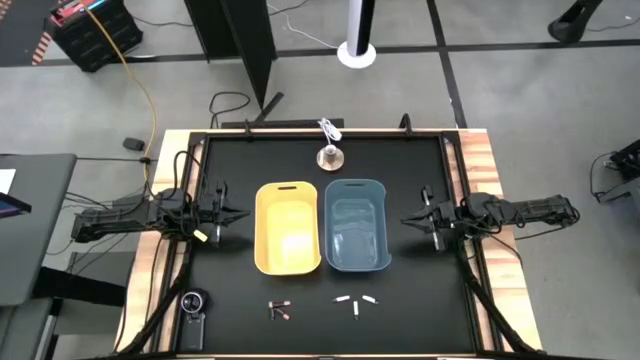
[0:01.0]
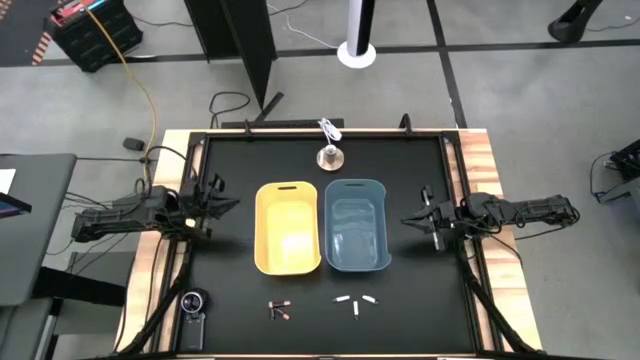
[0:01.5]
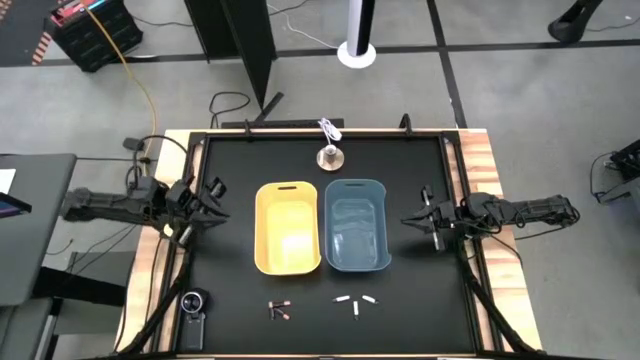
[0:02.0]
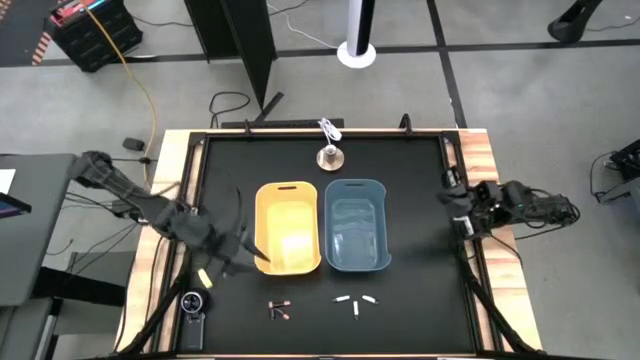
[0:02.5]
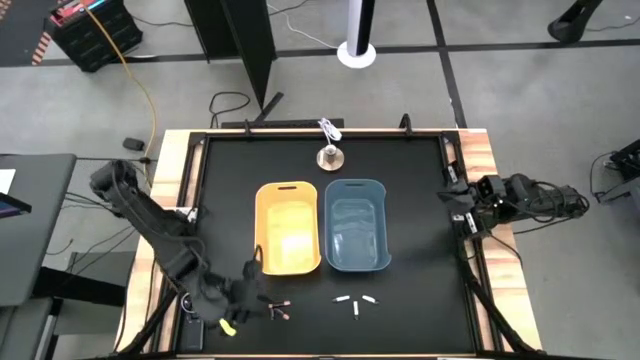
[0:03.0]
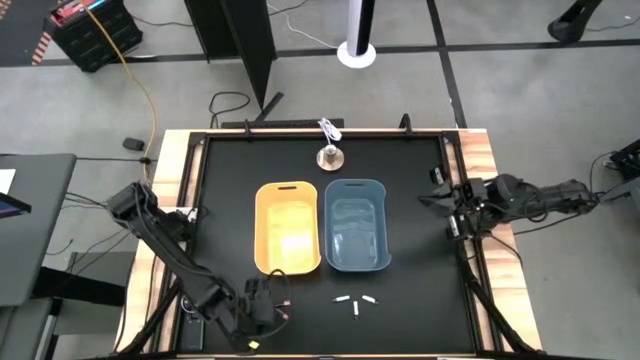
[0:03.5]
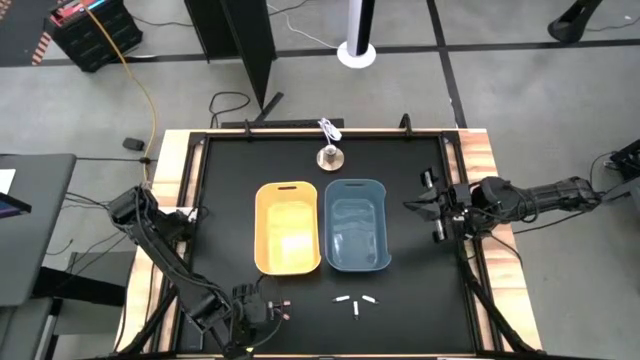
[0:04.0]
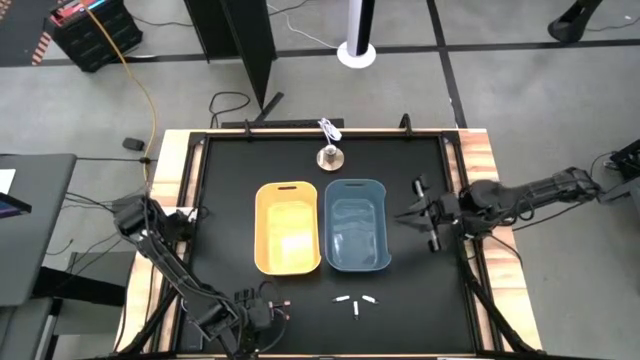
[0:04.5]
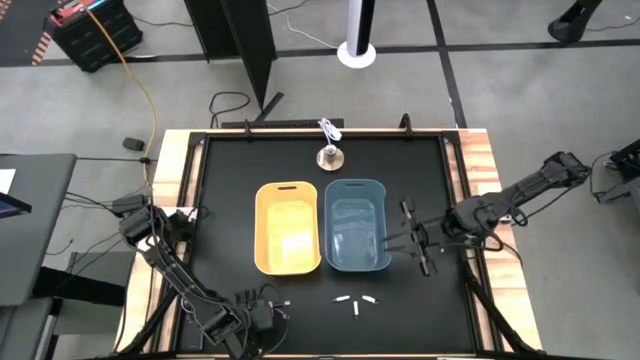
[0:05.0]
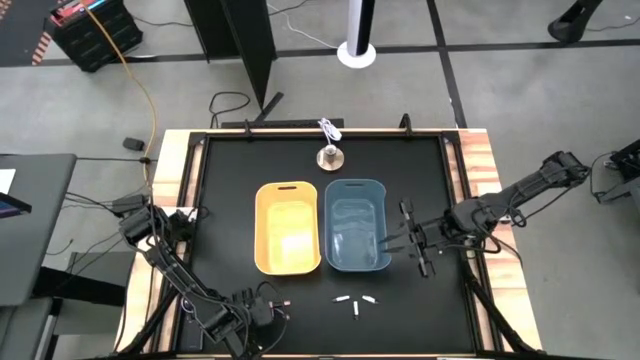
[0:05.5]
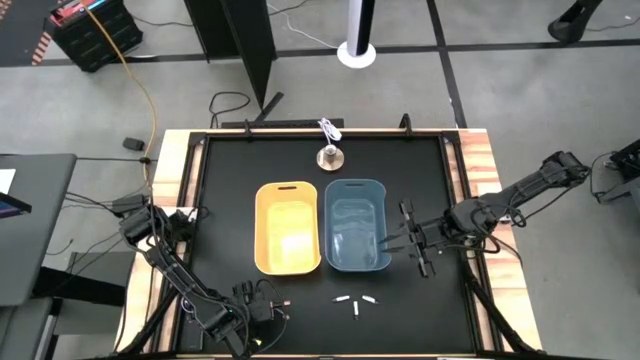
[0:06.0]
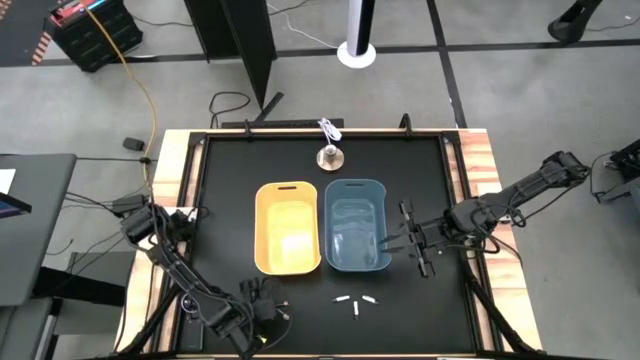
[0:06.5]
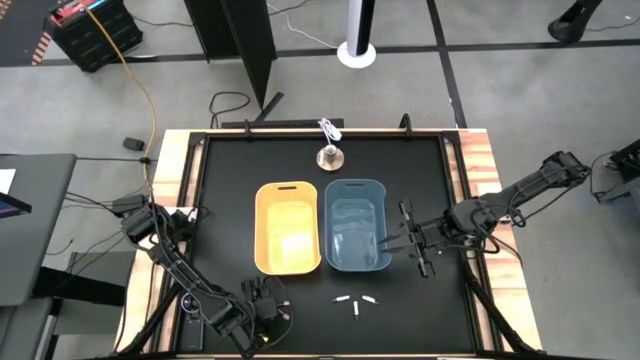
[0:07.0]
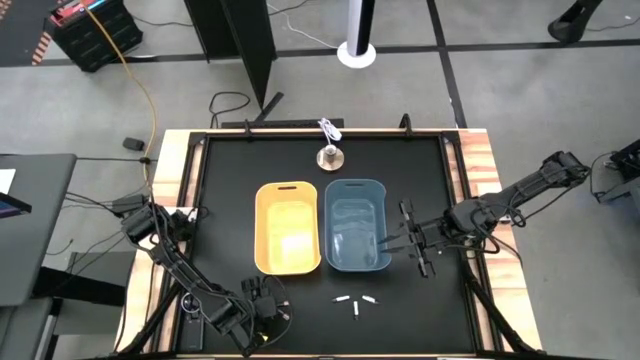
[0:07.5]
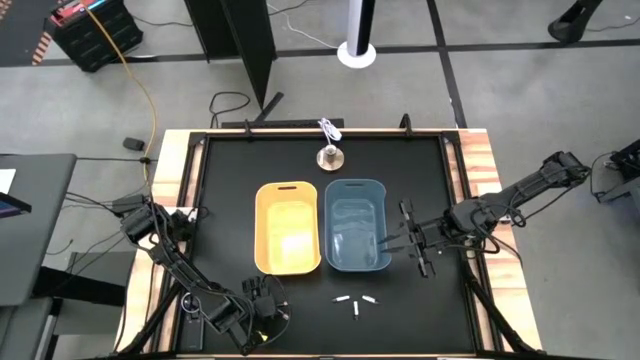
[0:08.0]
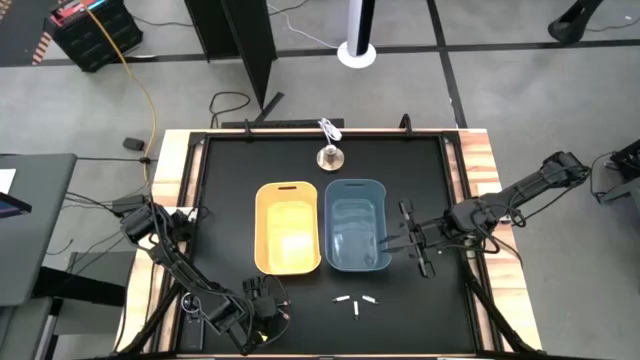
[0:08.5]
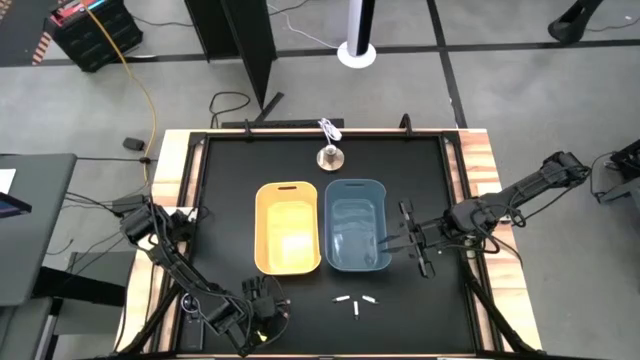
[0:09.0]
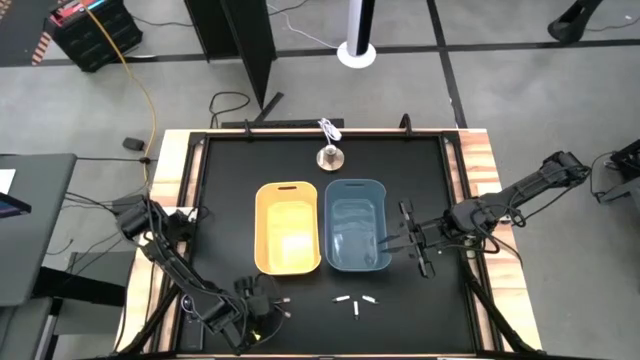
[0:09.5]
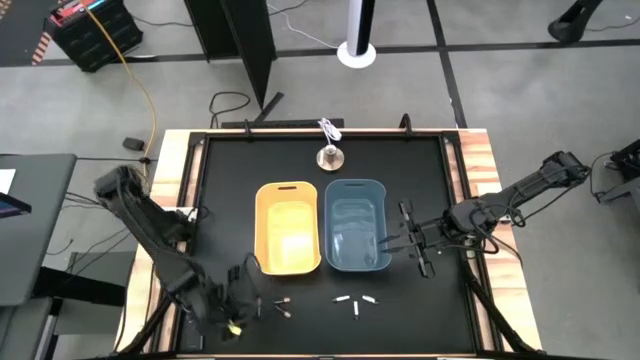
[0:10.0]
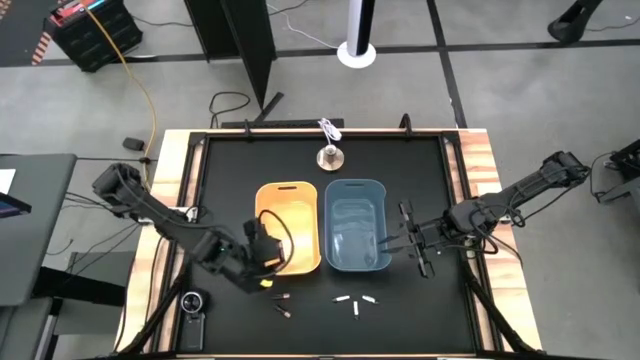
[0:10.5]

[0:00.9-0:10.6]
Task: Sort batteries
Put the left black battery into the orange bin

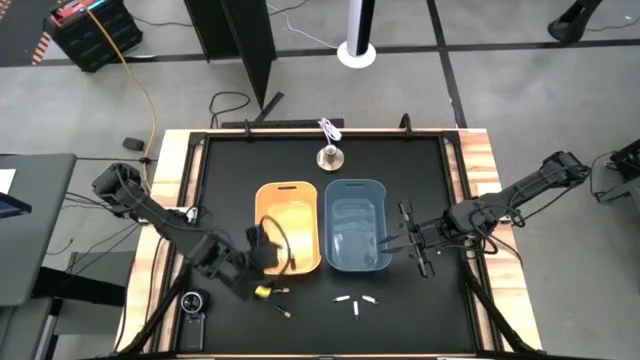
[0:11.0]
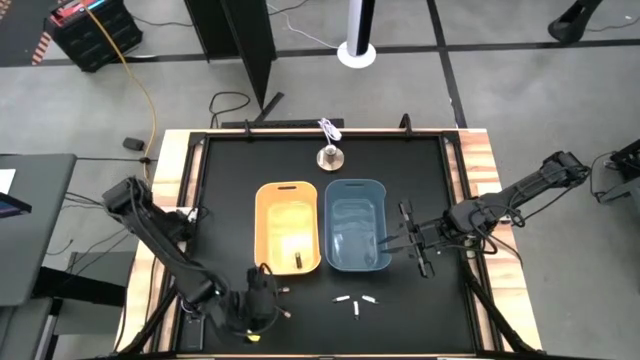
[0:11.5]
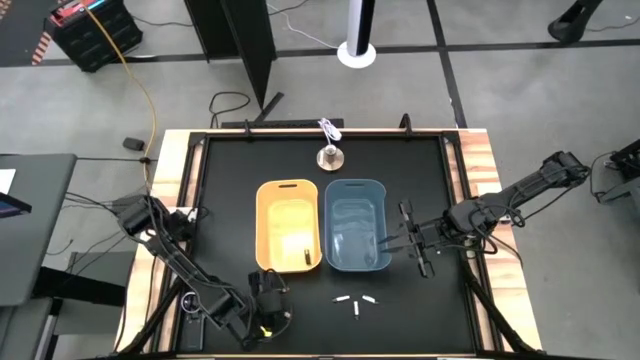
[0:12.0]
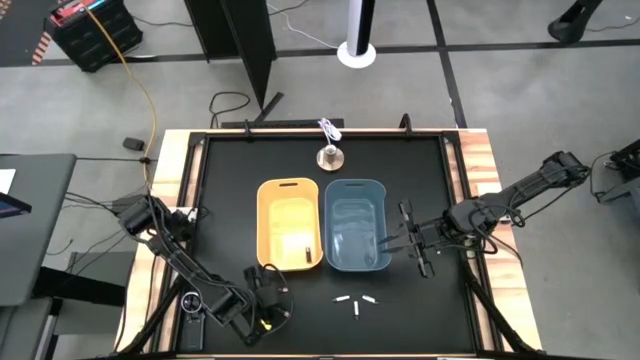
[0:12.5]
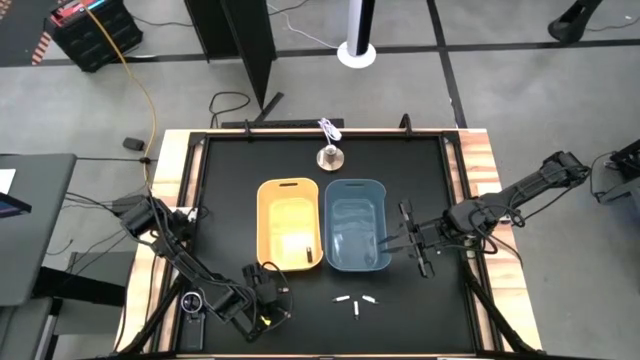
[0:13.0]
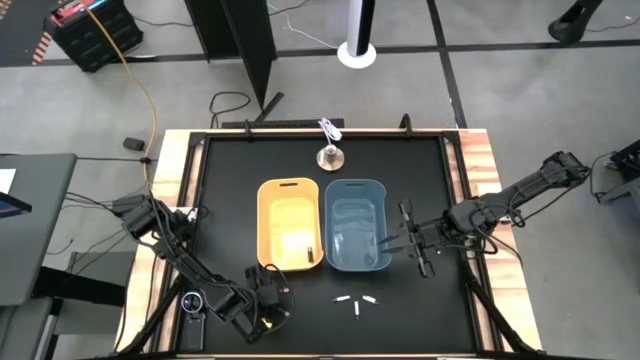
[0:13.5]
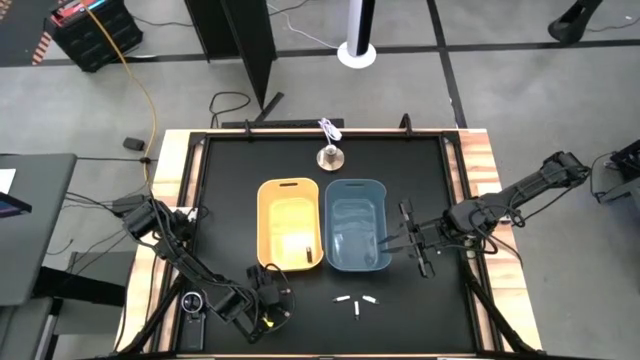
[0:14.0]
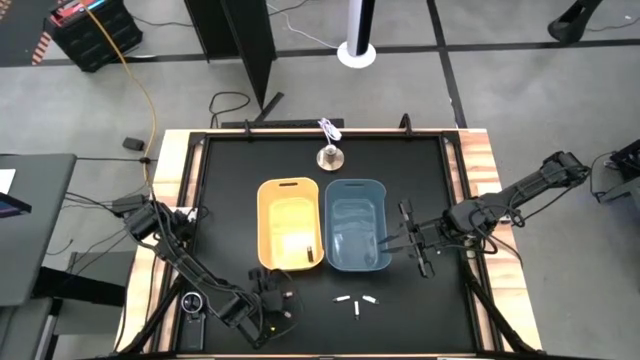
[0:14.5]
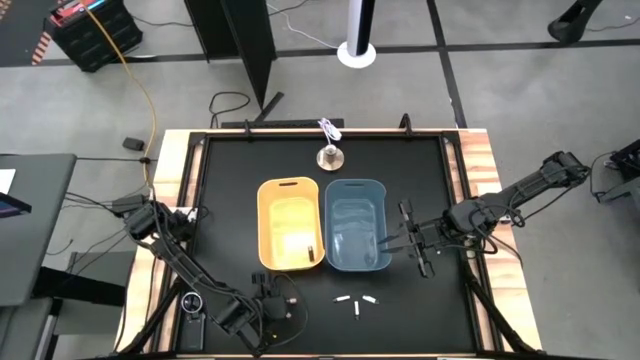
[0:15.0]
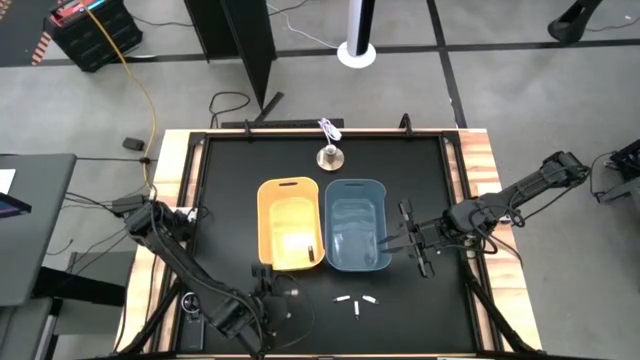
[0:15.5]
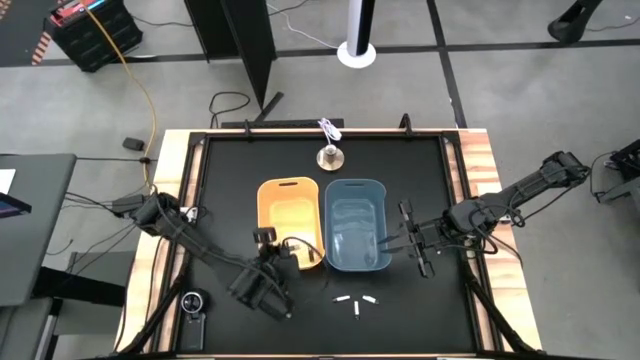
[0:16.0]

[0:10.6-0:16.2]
Put the top black battery into the orange bin

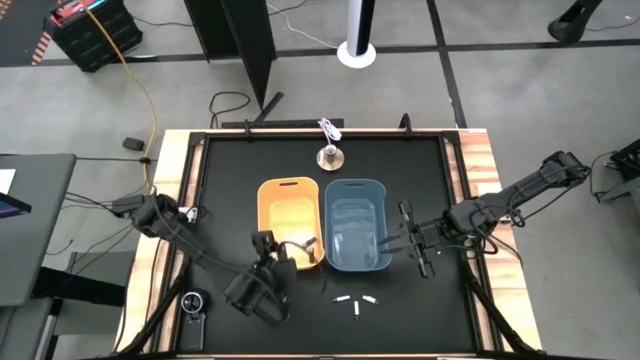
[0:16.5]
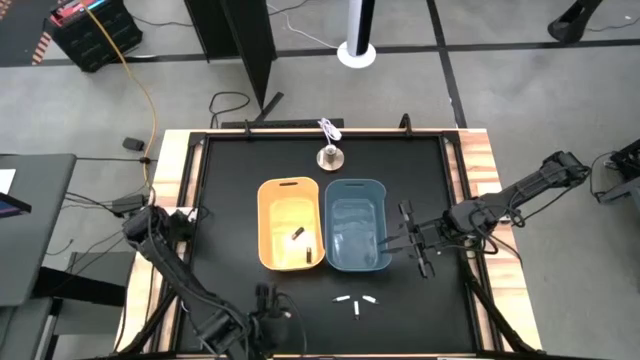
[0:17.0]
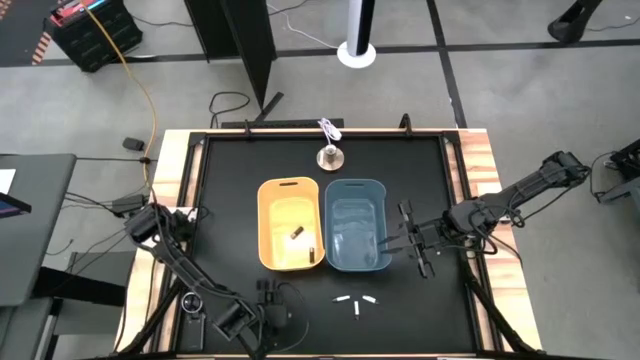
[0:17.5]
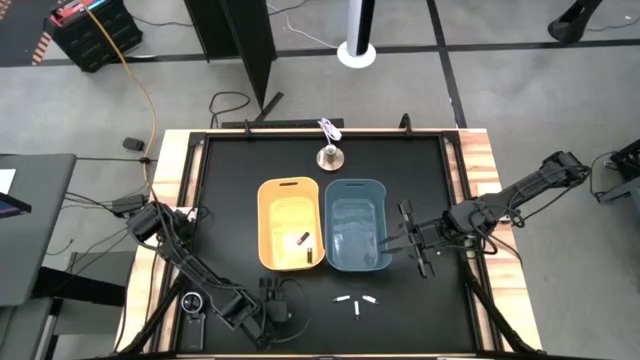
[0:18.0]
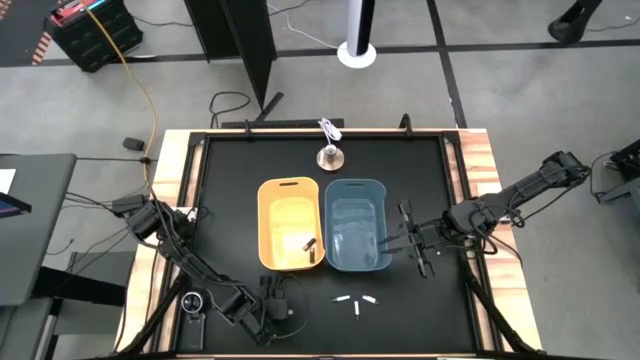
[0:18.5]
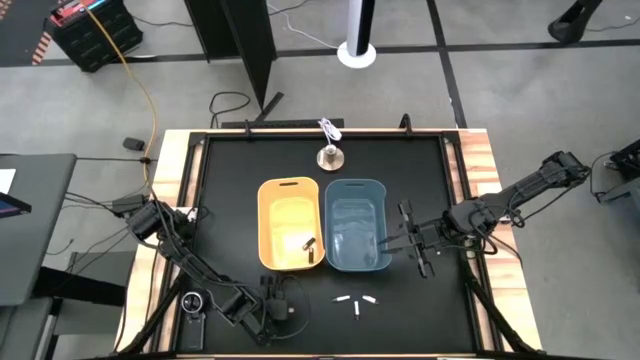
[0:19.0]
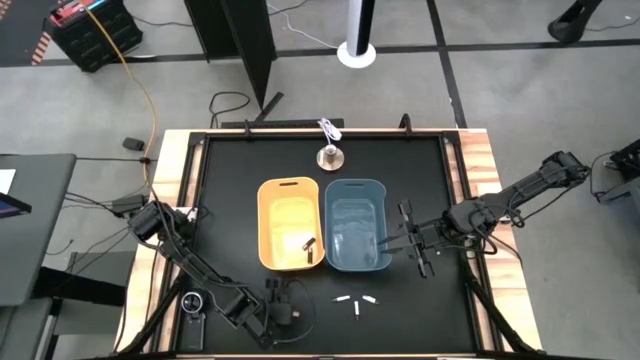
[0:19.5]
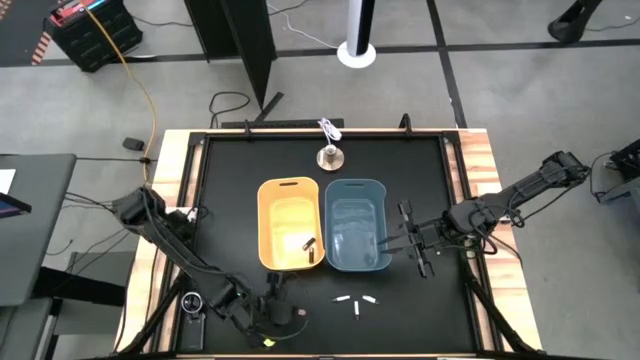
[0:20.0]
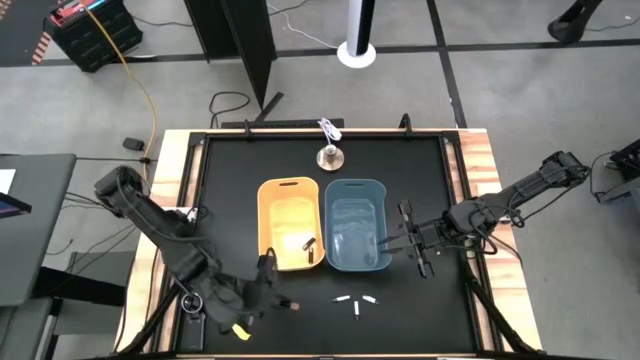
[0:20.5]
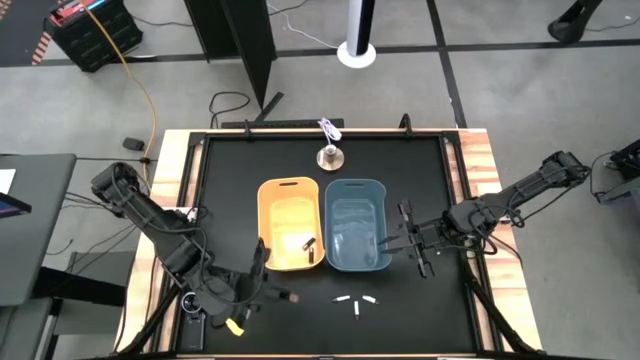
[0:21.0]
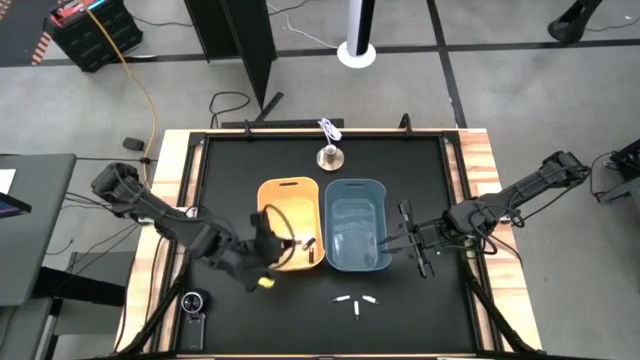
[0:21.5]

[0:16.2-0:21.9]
Put the black battery into the orange bin

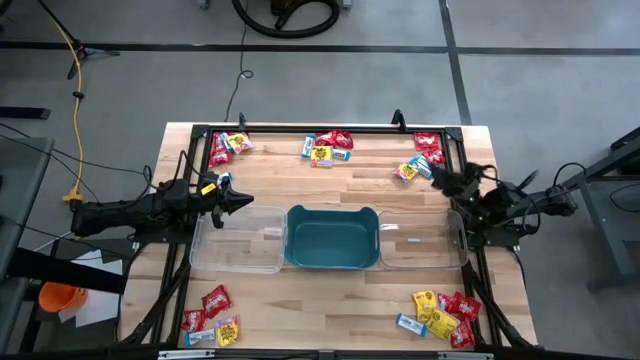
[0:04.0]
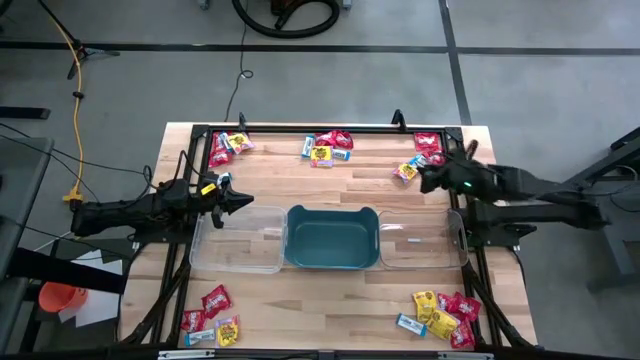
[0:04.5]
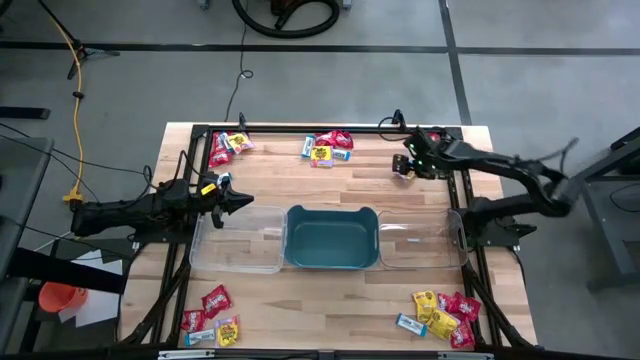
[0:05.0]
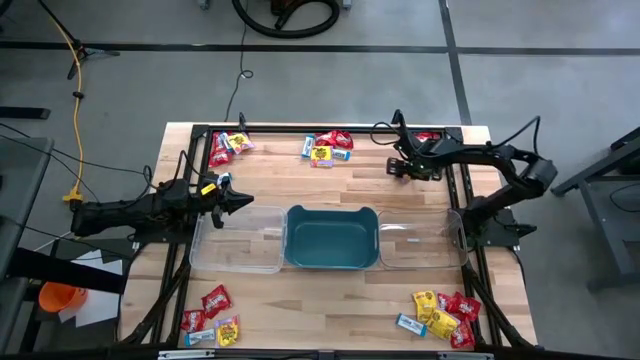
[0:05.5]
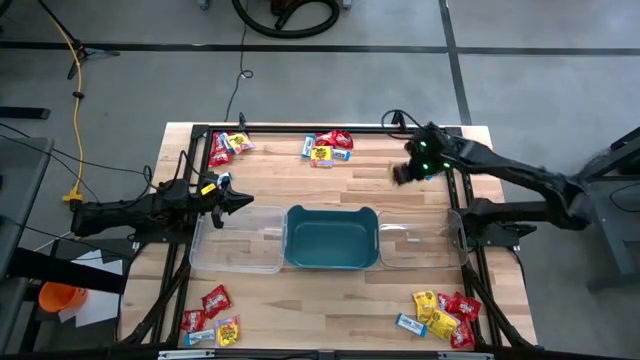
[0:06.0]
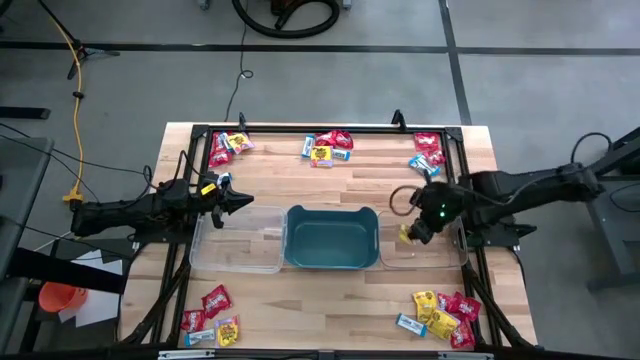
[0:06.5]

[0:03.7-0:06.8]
Task: Sort candy
Put the yellow candy into the right transparent bin
